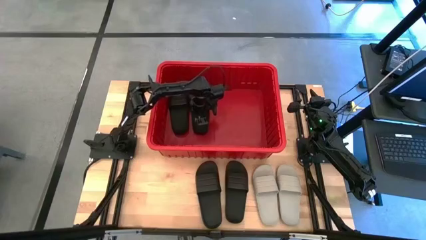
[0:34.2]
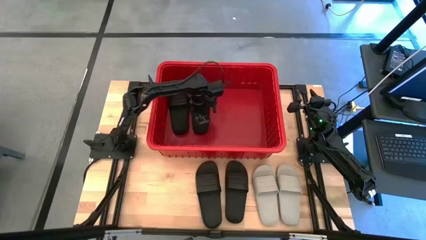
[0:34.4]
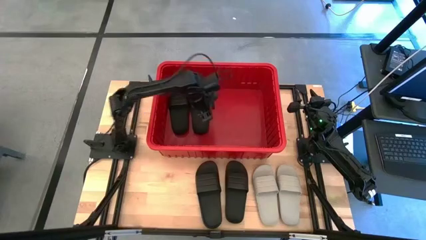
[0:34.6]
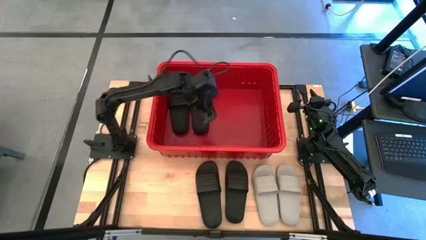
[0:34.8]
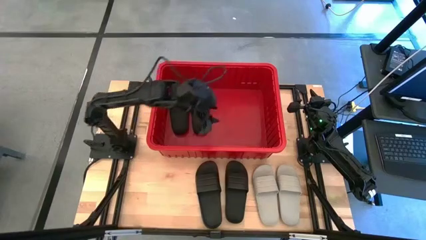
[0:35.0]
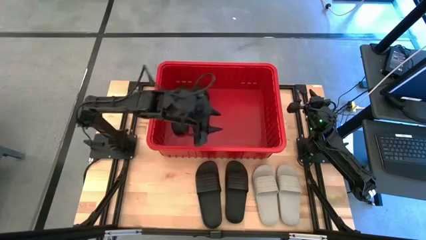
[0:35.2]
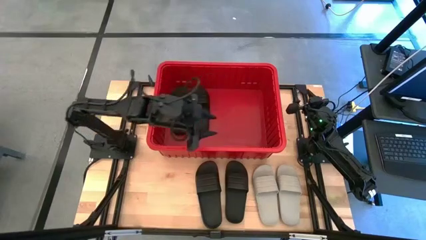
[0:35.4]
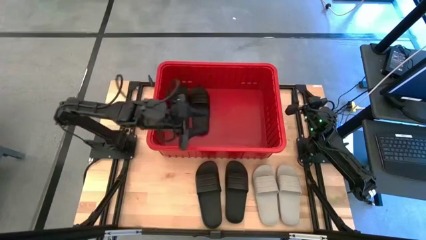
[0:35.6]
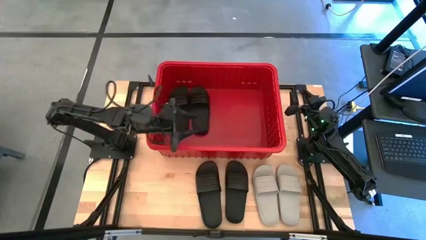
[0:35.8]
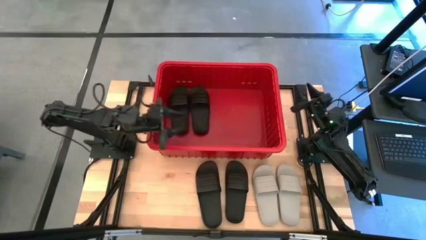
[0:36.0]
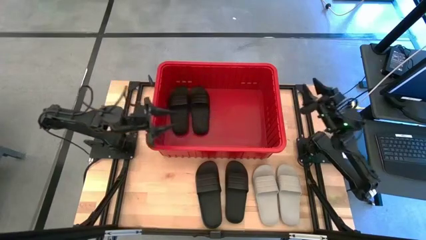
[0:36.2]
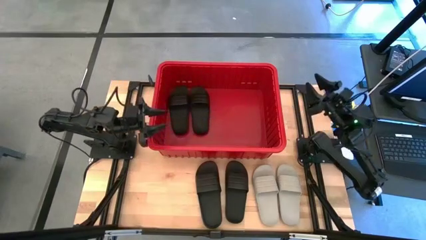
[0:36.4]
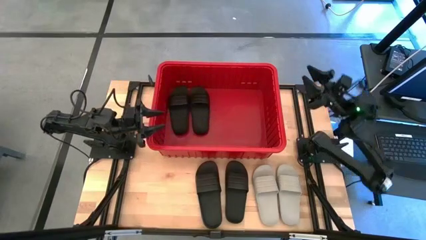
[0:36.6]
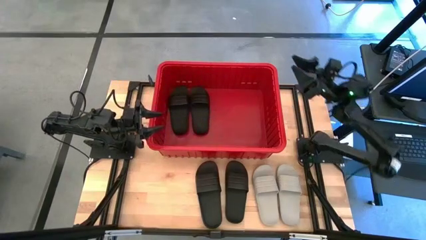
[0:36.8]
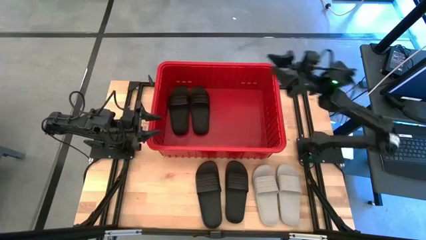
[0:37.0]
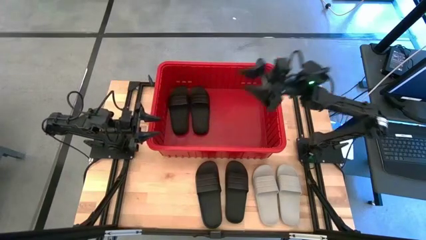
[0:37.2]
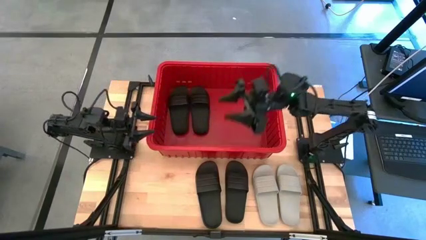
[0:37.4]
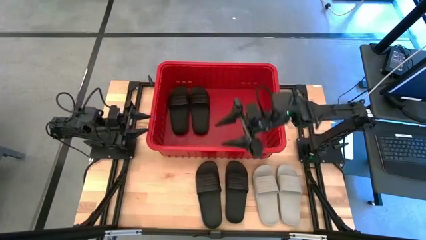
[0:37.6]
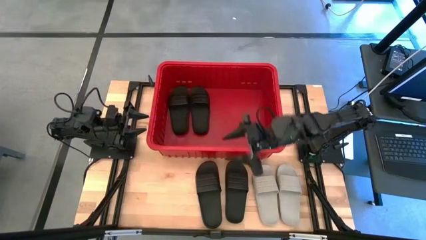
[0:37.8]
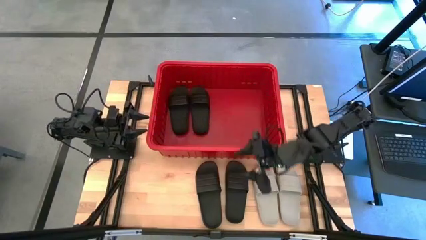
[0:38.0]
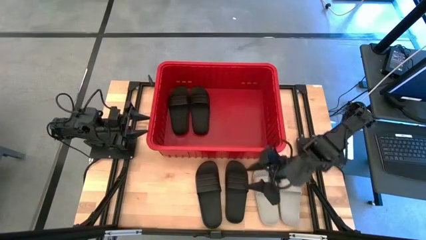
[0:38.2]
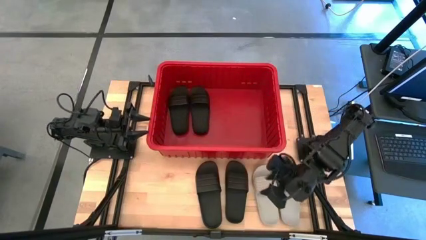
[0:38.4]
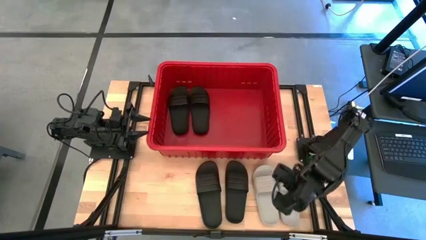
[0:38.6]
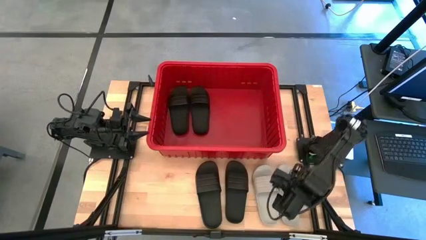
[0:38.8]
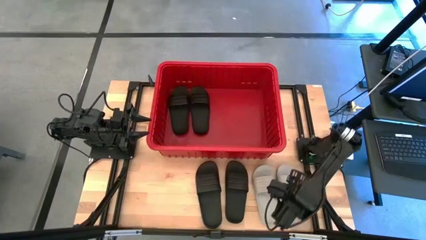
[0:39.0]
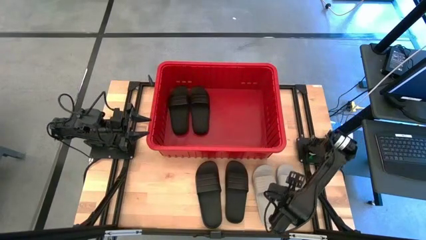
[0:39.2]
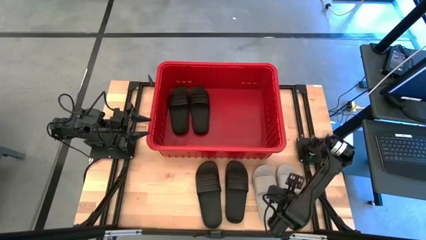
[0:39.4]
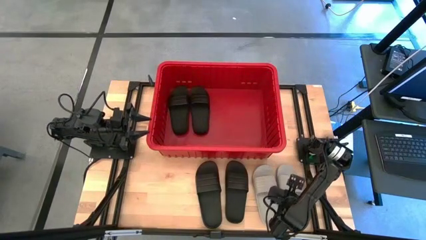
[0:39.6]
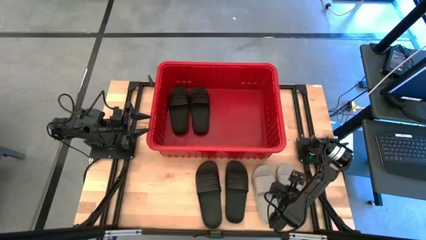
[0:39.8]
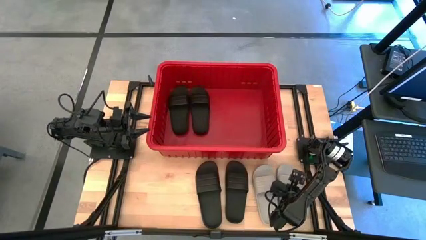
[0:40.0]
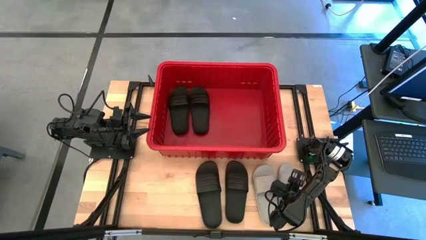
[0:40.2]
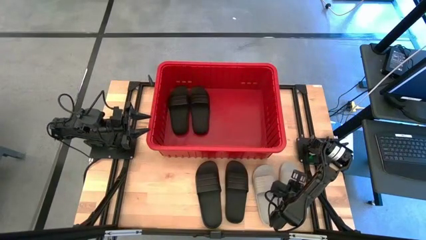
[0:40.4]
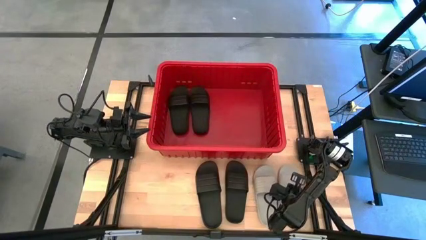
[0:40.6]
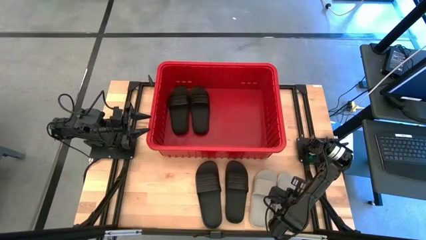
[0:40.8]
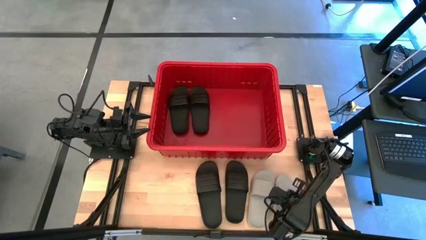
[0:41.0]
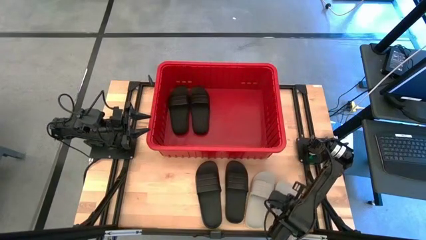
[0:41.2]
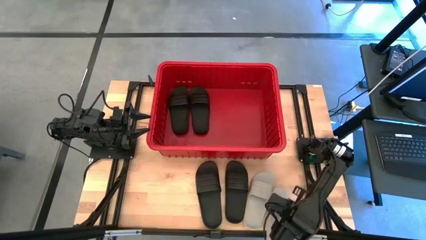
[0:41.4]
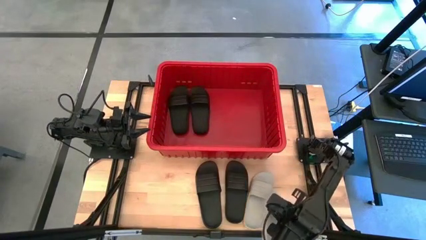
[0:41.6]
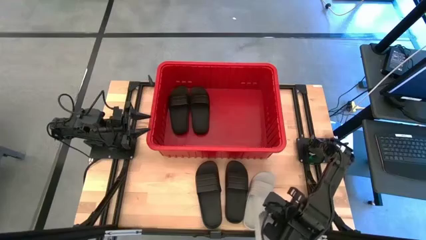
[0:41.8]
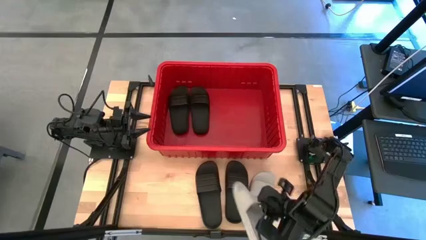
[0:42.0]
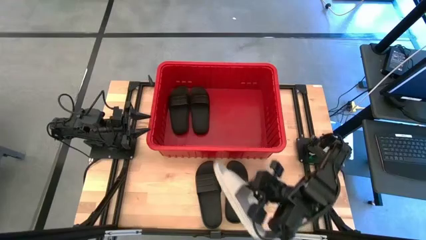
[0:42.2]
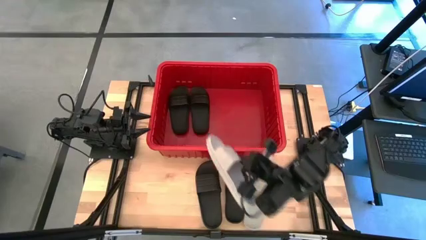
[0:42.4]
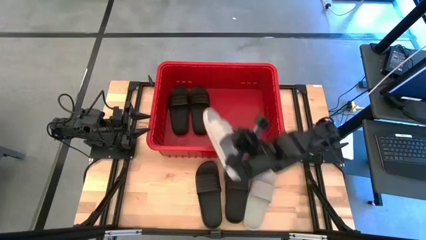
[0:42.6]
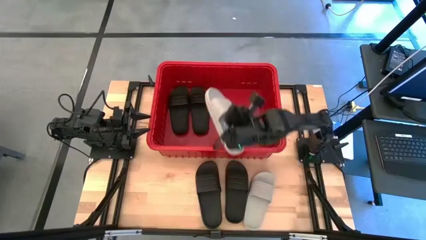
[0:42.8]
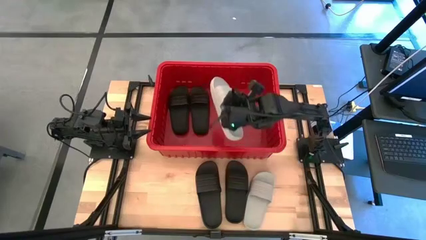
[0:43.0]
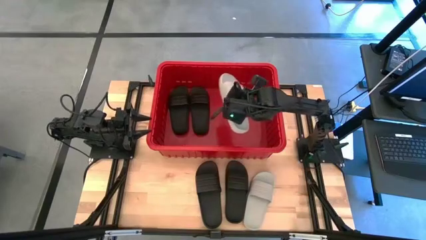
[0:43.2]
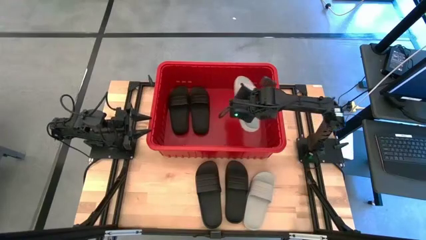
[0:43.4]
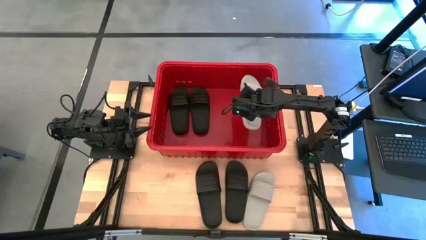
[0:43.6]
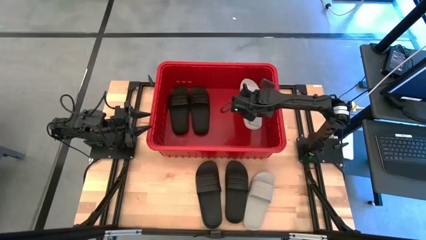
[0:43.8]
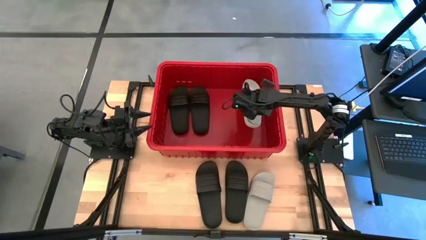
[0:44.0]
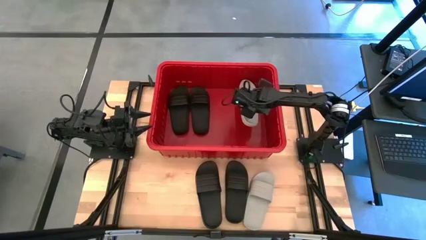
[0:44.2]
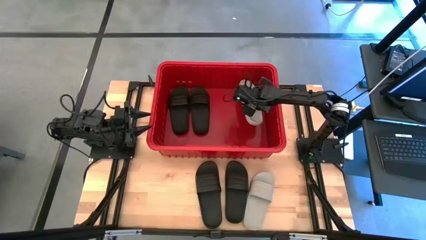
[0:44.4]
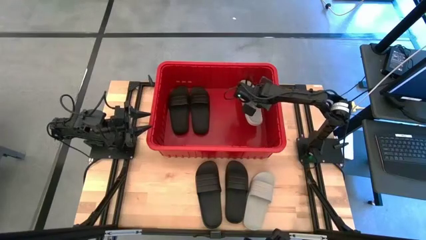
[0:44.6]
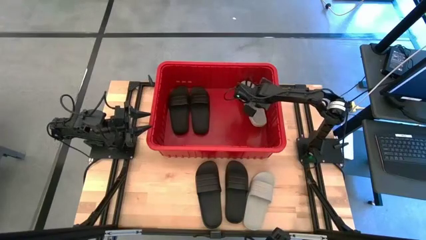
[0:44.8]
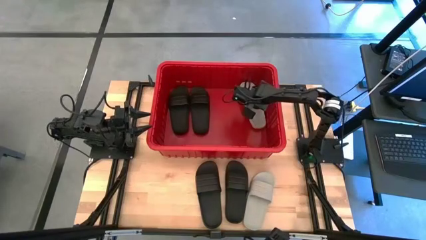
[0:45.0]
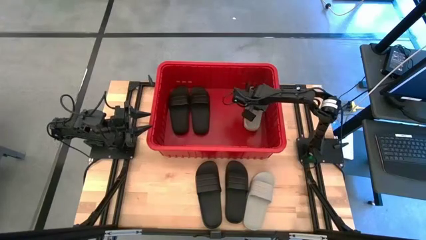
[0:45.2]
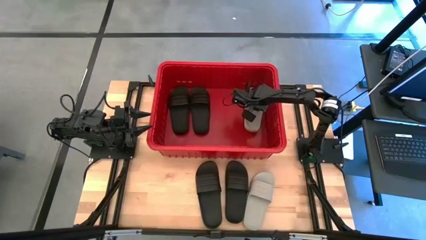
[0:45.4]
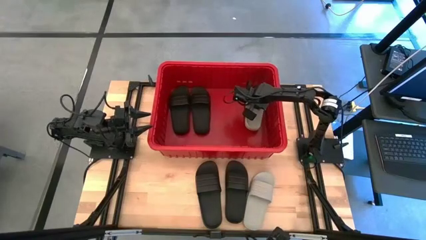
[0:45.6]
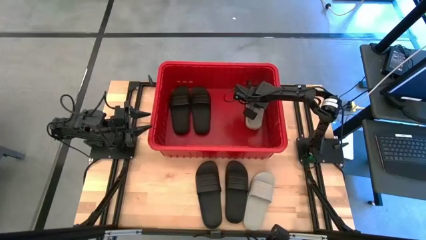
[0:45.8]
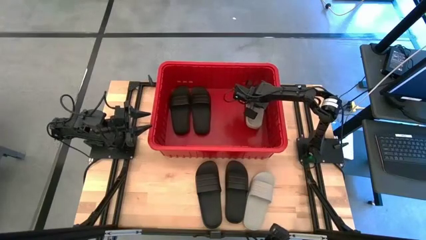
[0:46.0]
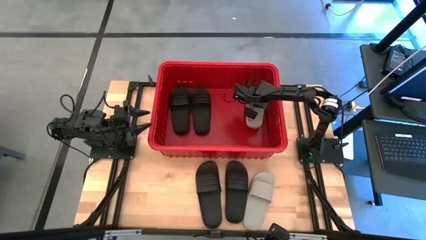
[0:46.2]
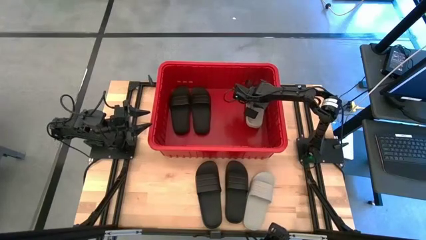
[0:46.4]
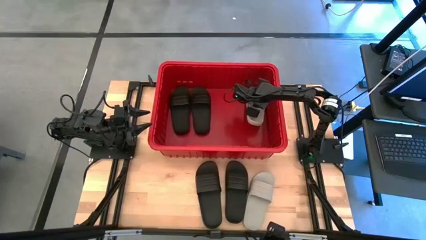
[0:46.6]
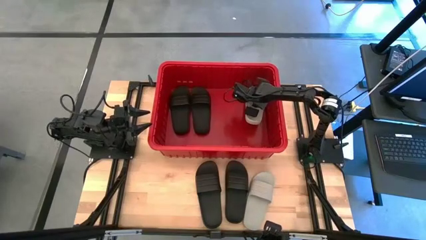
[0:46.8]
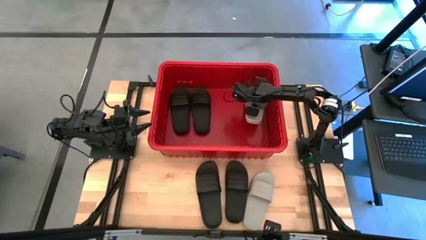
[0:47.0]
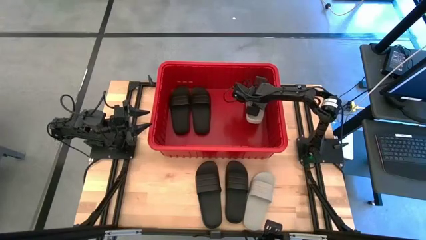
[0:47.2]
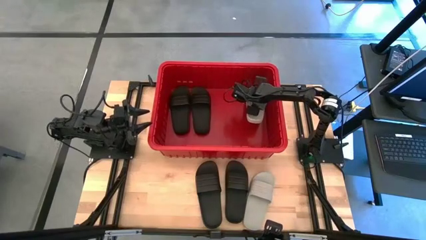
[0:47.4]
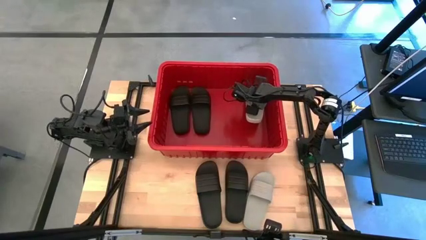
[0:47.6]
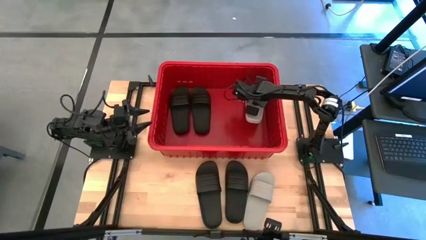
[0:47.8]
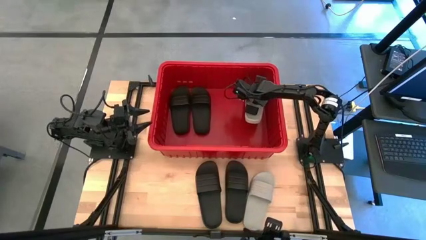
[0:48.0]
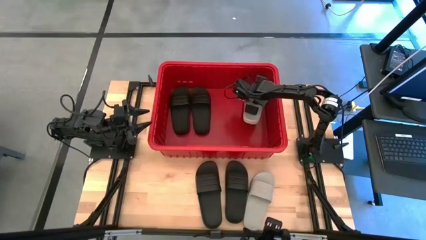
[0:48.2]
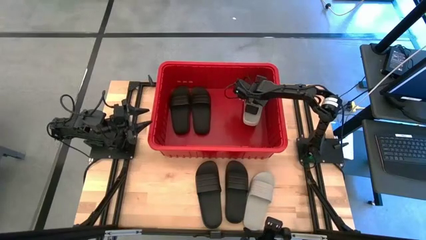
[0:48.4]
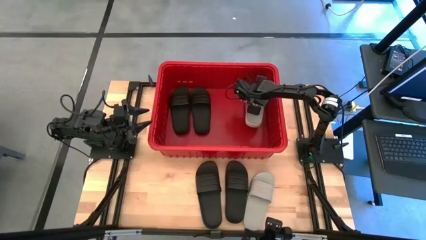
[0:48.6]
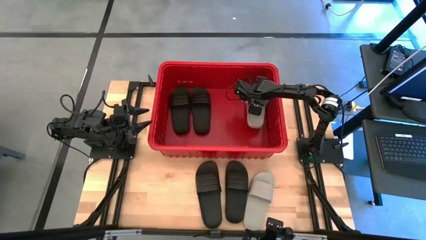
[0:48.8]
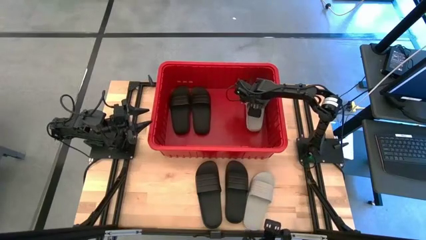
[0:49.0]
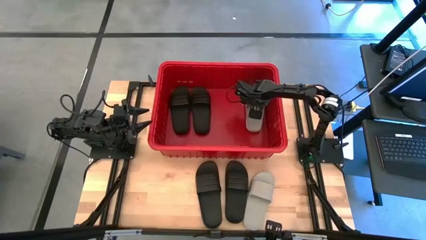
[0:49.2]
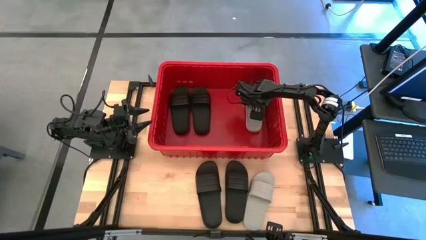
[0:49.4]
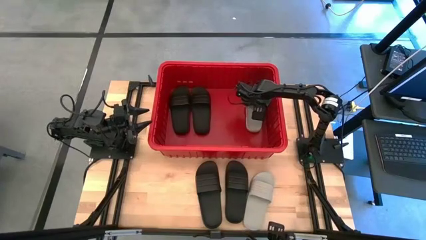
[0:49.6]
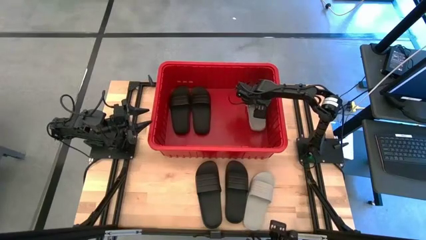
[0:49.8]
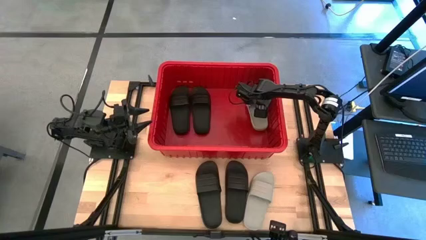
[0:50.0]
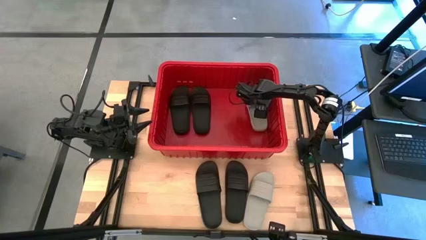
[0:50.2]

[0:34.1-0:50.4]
Task: Pick and place slides into bin
Put the white slide into the red bin

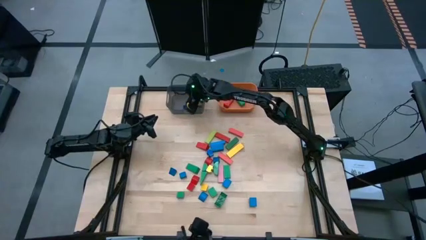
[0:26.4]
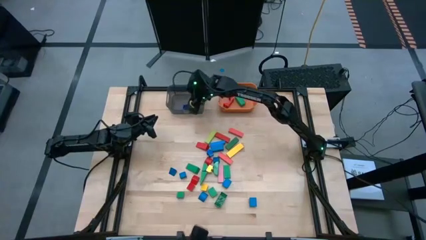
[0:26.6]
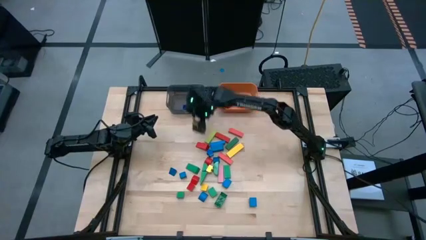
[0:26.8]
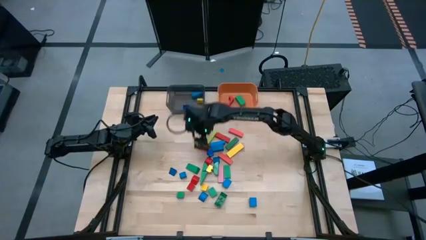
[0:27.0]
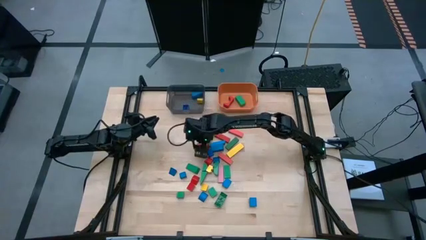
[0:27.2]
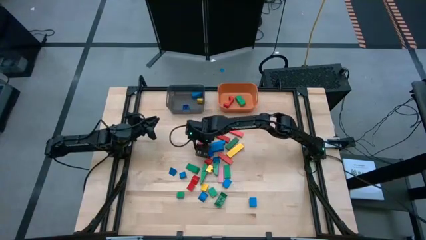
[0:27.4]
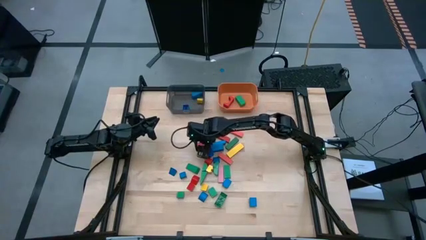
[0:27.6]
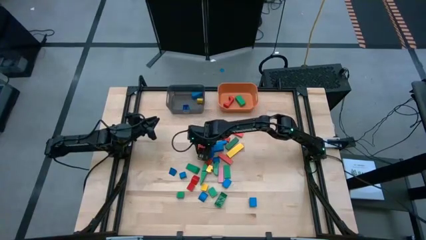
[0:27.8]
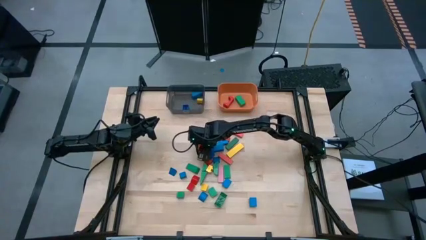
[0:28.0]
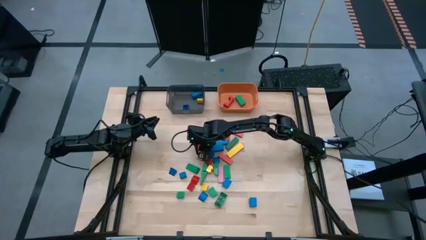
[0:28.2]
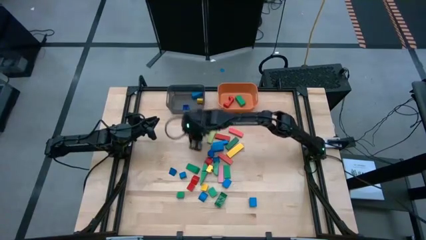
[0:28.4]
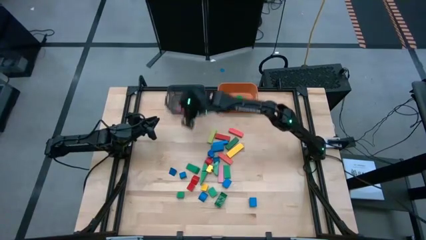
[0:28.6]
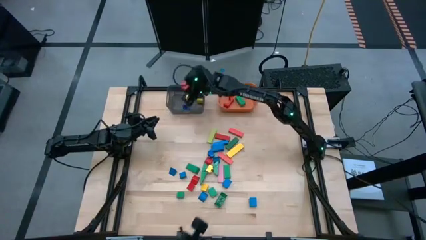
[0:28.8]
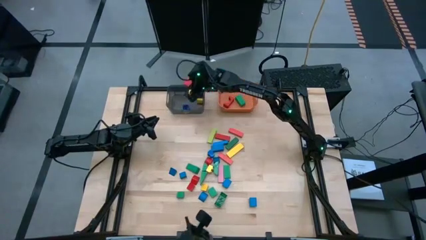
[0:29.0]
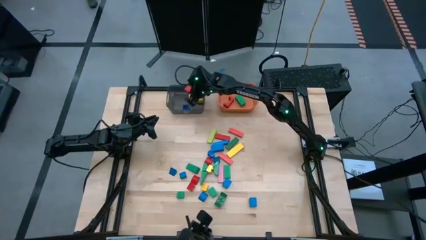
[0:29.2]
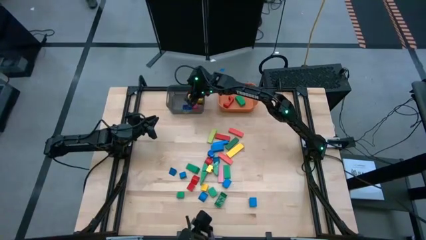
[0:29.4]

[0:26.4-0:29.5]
Task: Sort blocks by size
Put the small red block into the black bin
